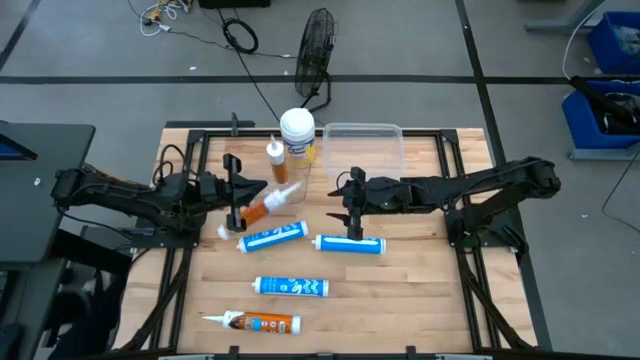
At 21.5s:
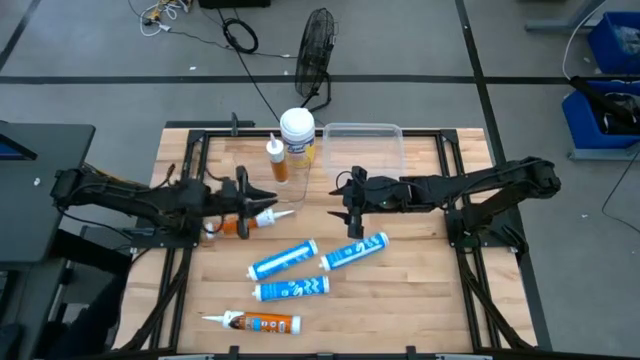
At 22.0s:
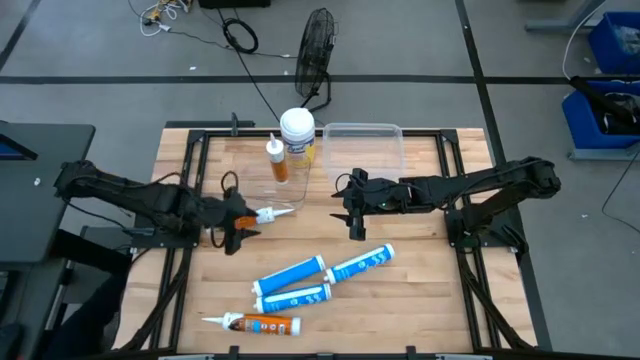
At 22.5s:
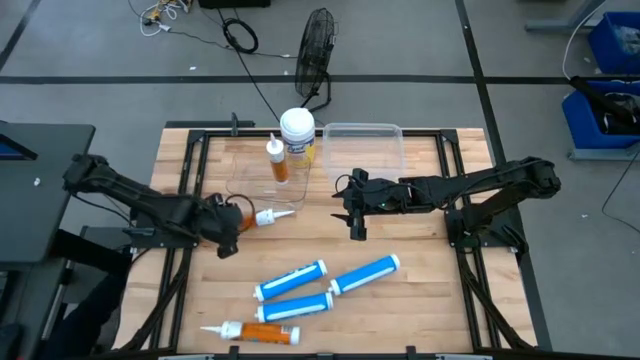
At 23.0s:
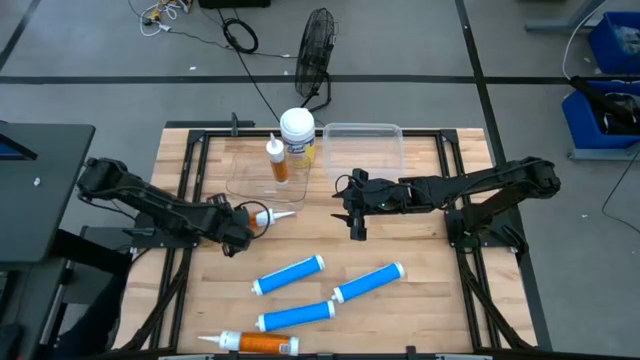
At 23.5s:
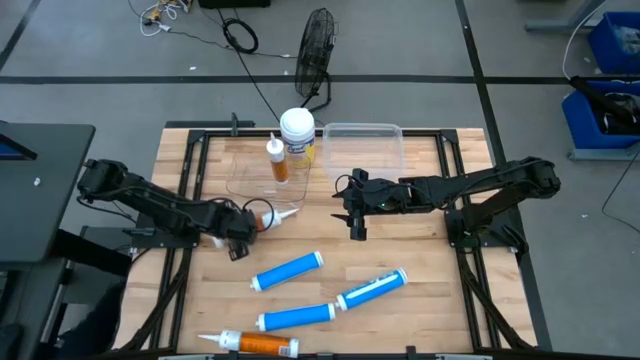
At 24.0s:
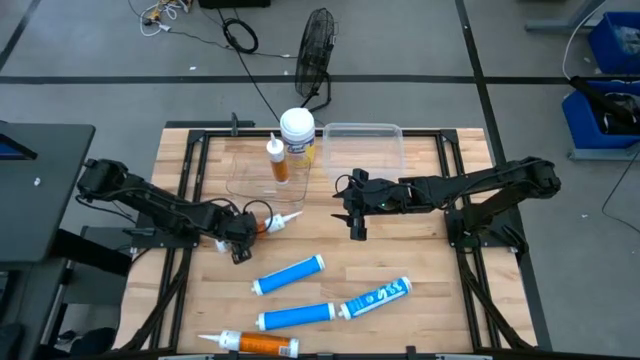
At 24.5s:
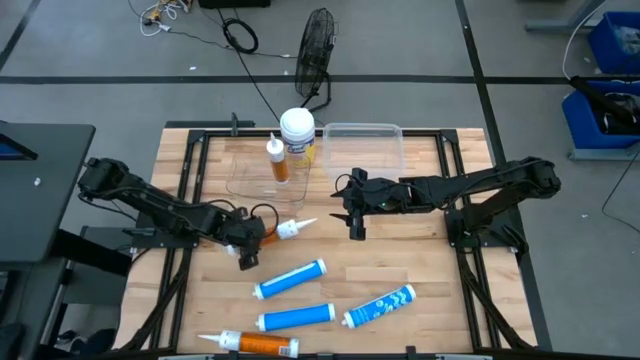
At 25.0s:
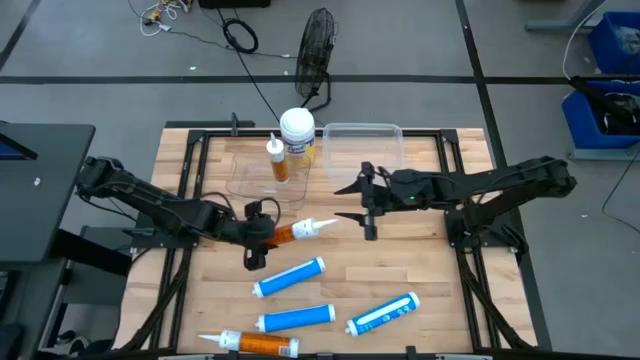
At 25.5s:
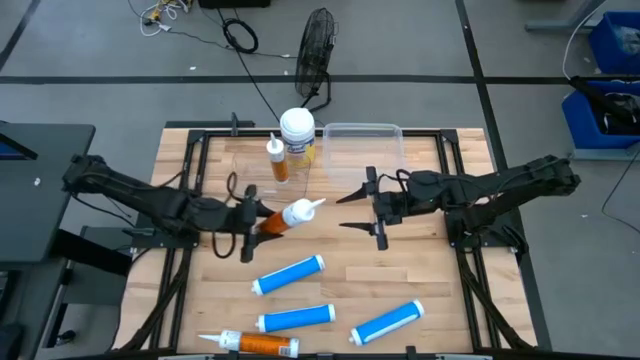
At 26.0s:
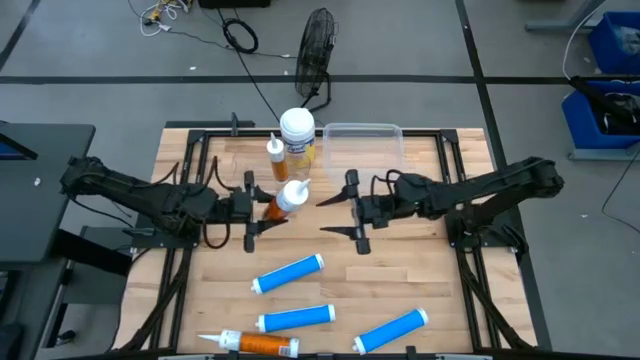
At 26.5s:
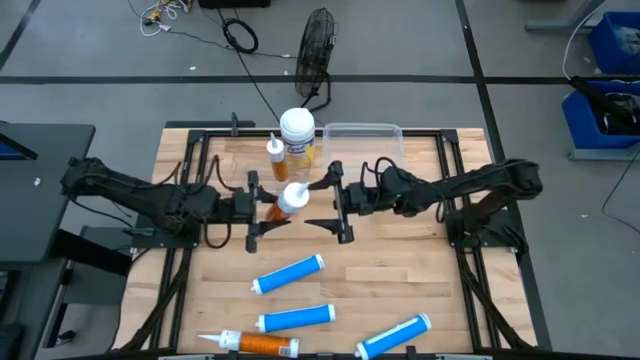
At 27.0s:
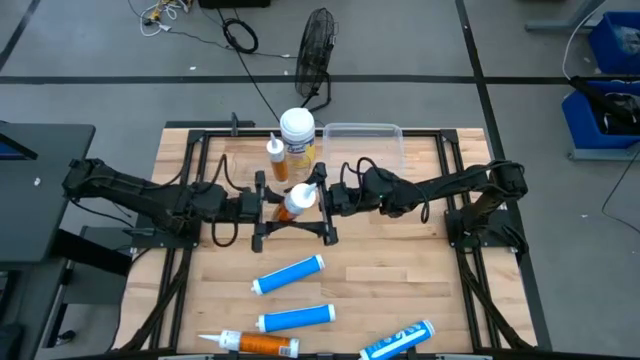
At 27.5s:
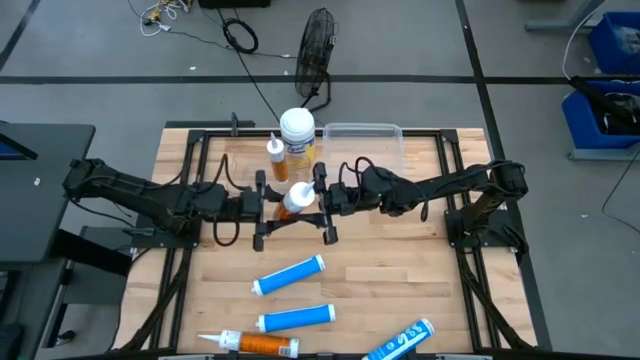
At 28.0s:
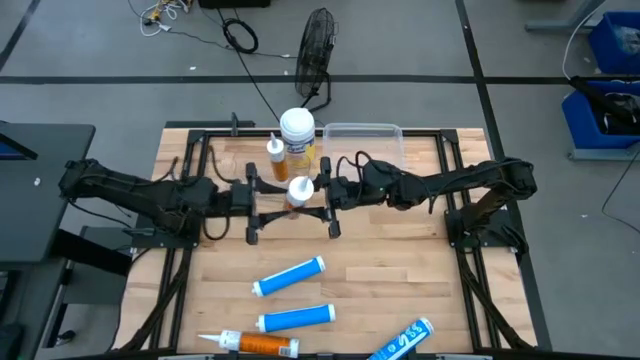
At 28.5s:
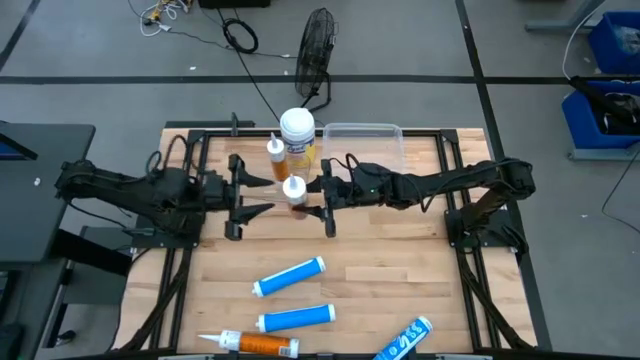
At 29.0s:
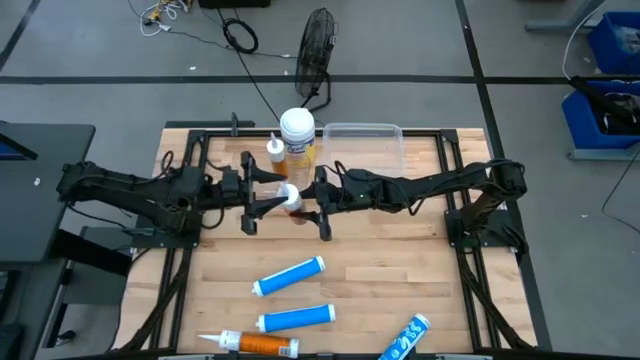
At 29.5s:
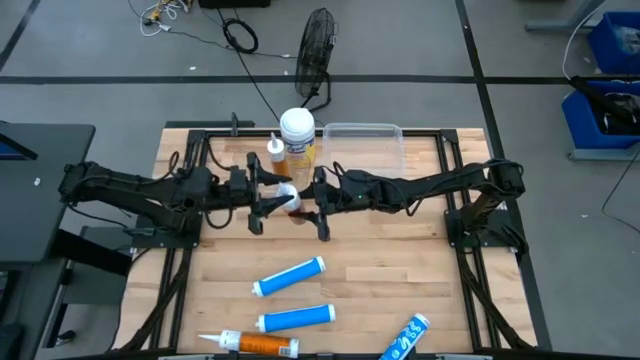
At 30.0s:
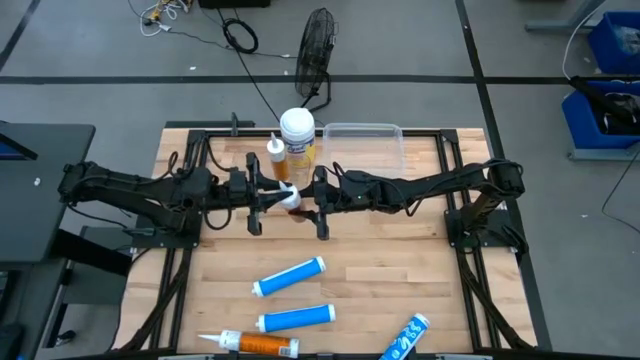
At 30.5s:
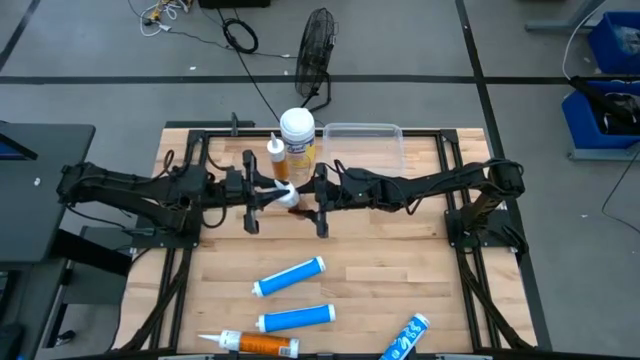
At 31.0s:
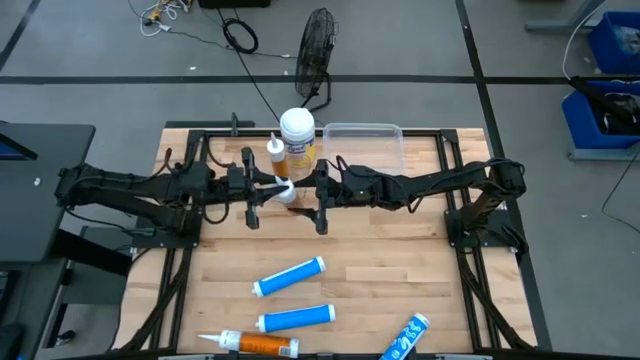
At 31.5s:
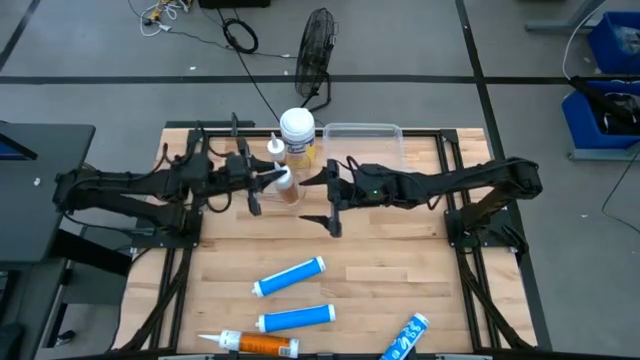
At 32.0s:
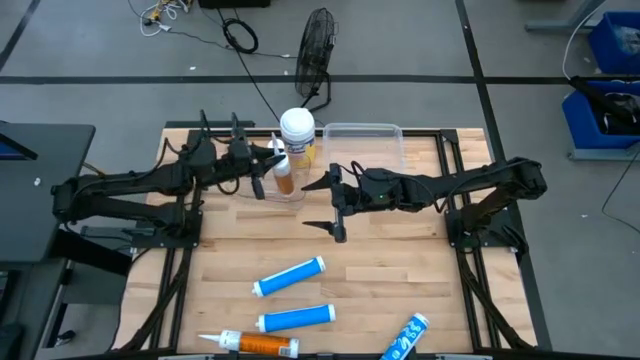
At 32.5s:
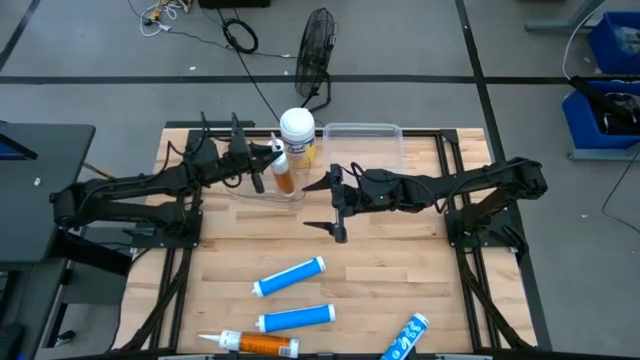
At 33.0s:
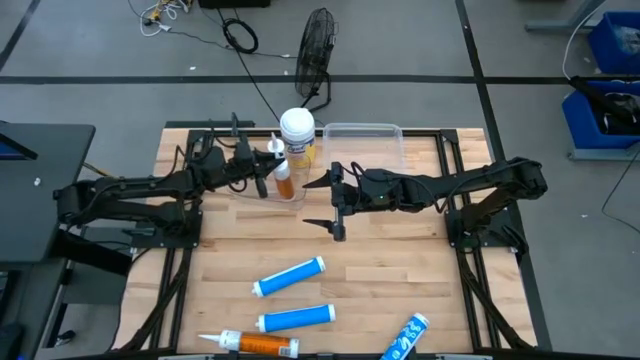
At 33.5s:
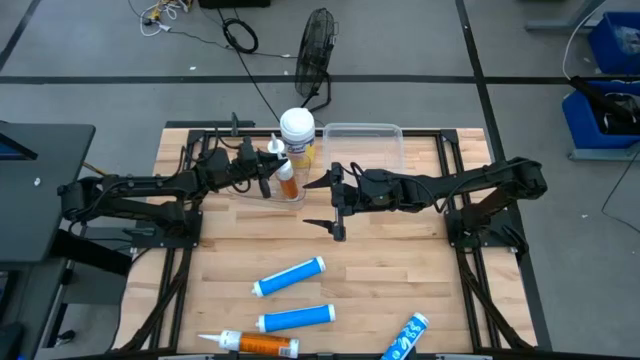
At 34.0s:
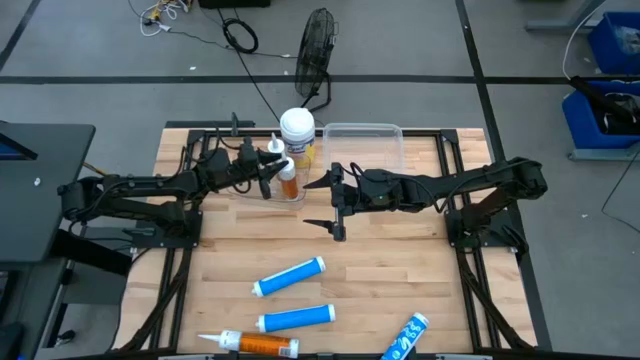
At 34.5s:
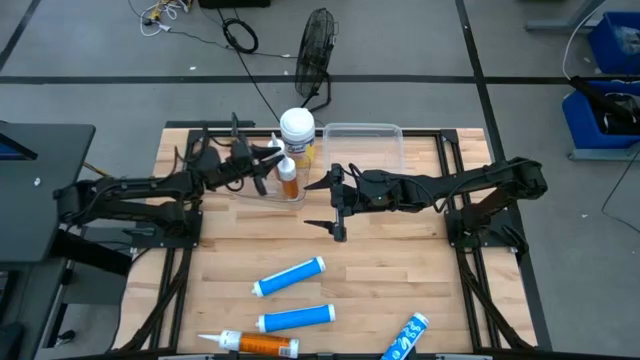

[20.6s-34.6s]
Task: Pick & place silicon tubes, Sealant and Lysol wipes
Put the top orange sealant into the left transparent bin

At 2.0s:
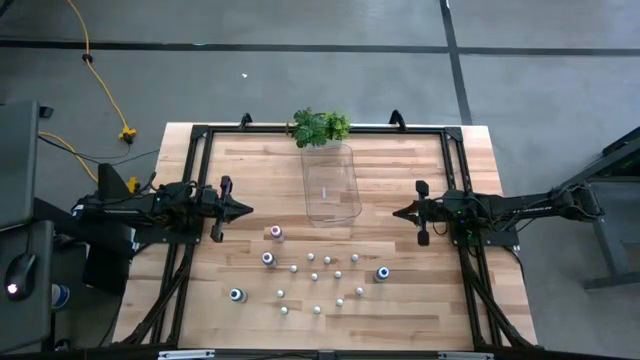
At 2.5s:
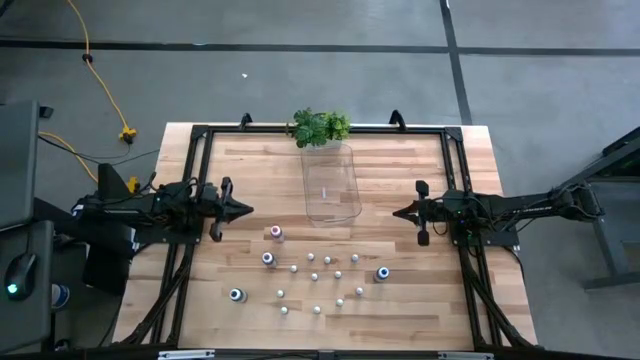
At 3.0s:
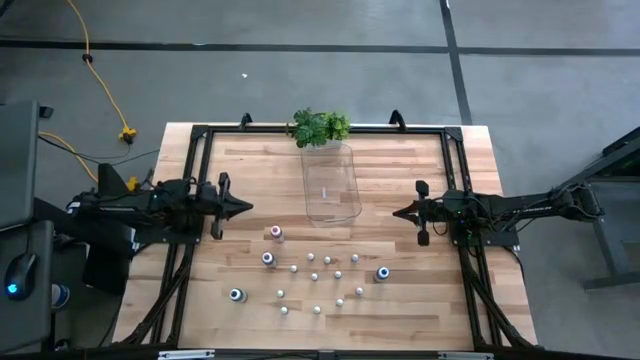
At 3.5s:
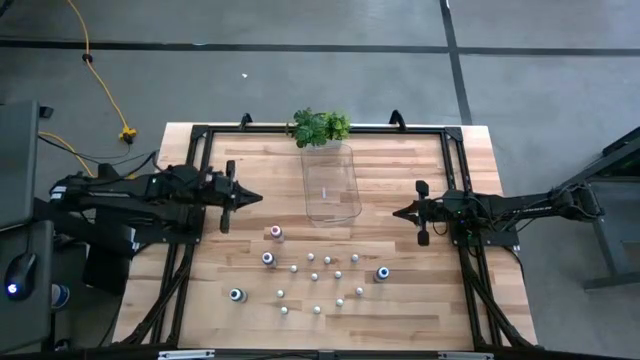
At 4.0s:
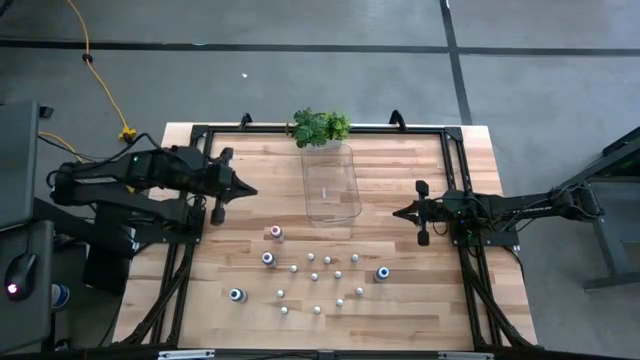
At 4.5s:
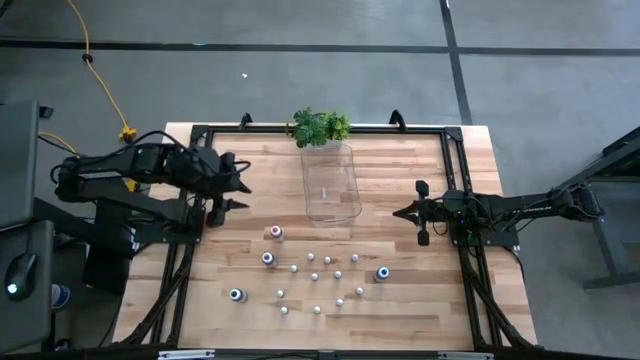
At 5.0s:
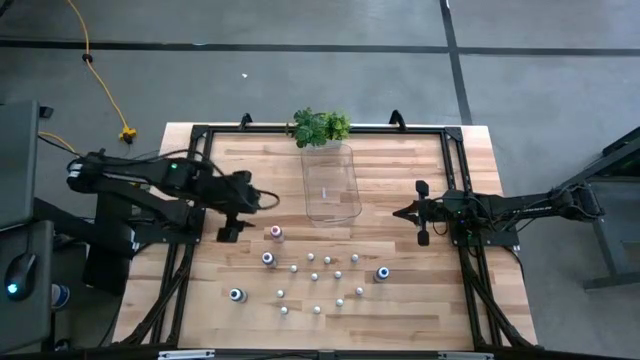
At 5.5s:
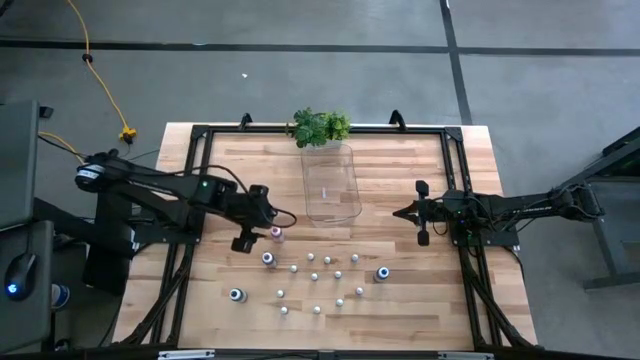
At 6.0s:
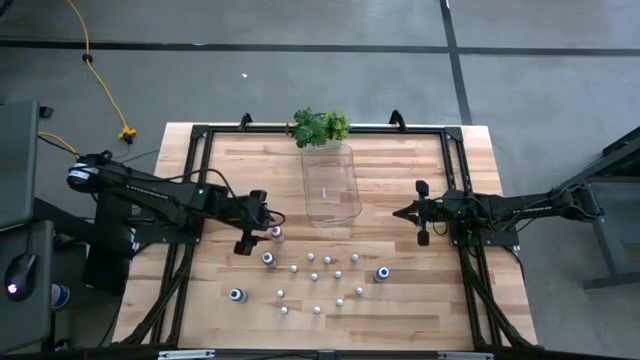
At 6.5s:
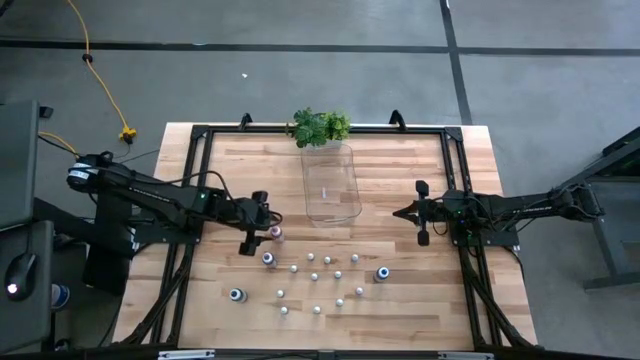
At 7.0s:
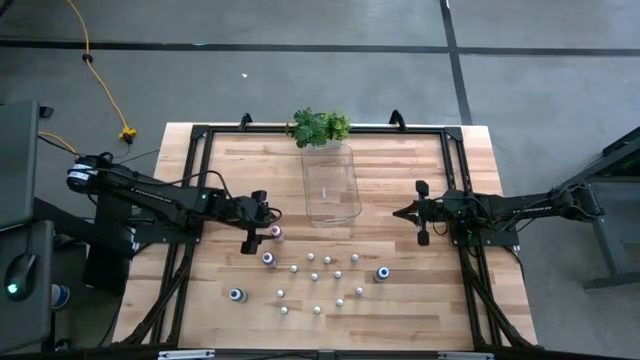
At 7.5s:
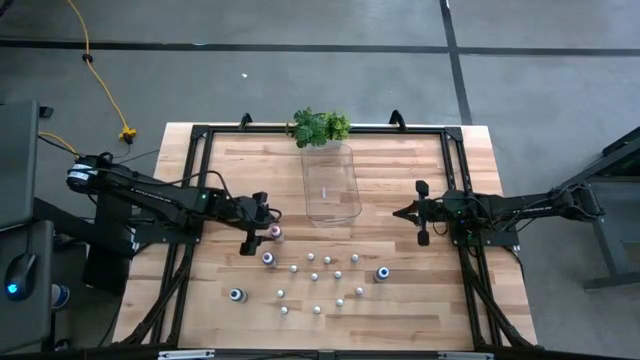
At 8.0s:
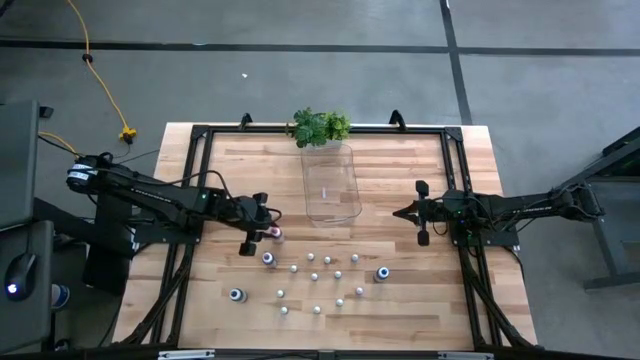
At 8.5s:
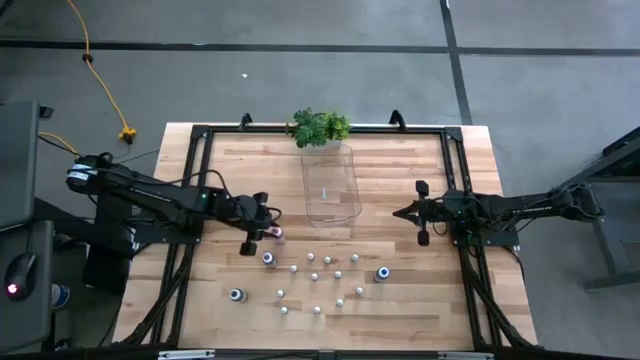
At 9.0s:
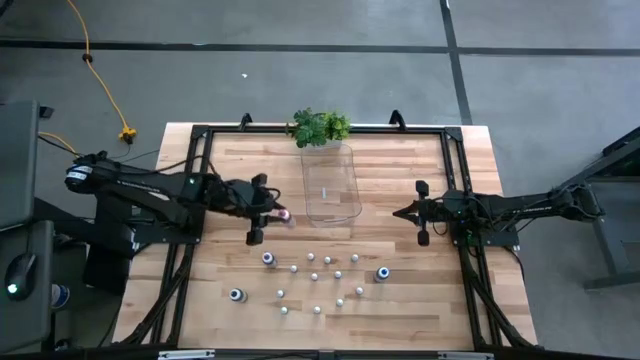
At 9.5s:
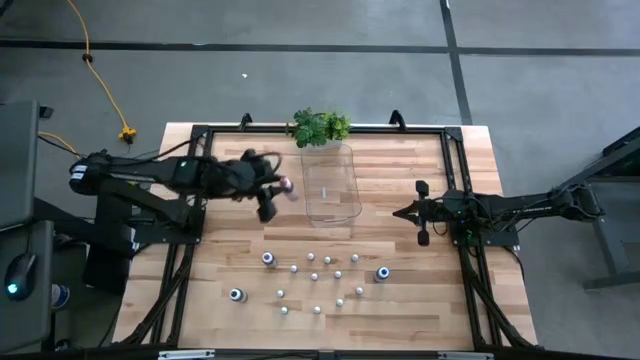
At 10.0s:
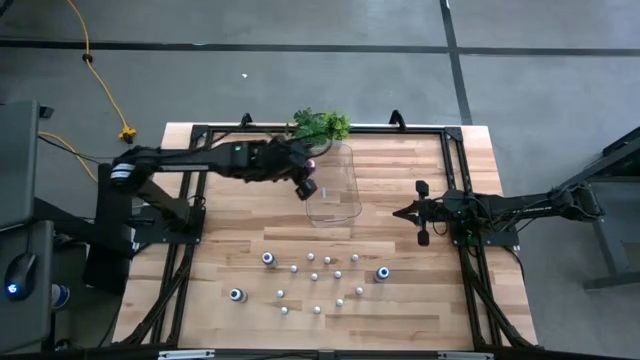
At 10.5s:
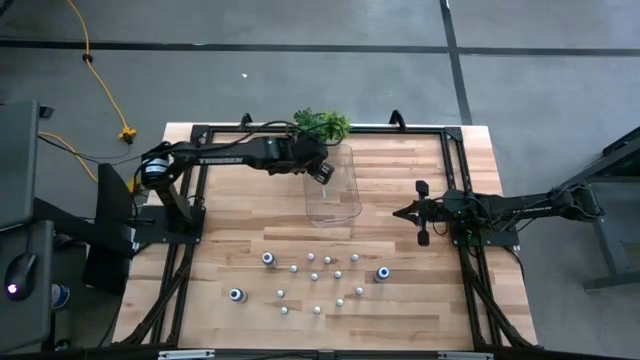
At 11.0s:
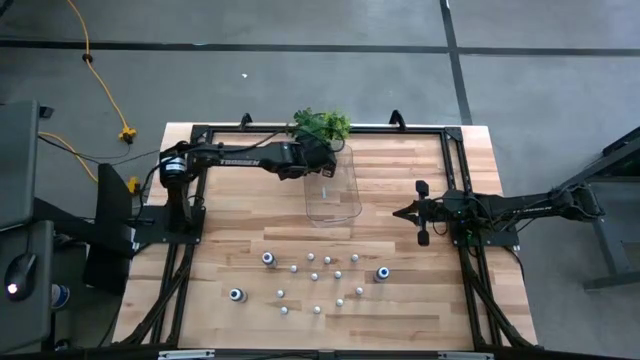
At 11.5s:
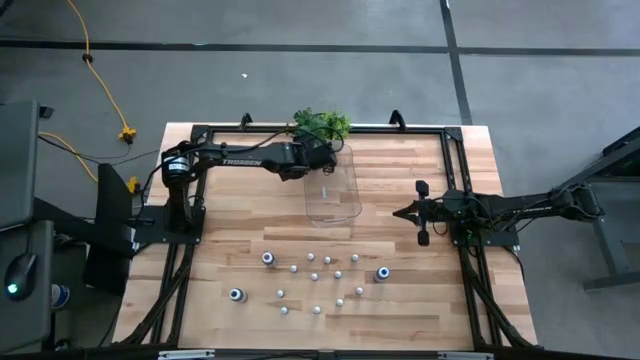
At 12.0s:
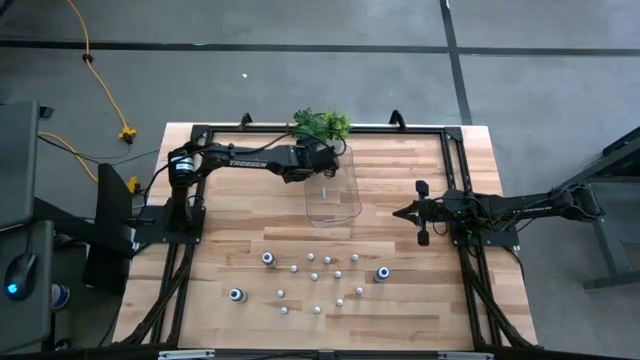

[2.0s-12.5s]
Task: Pick & Place food coloring
Put the large pink food coloring bottle into the transparent bin
